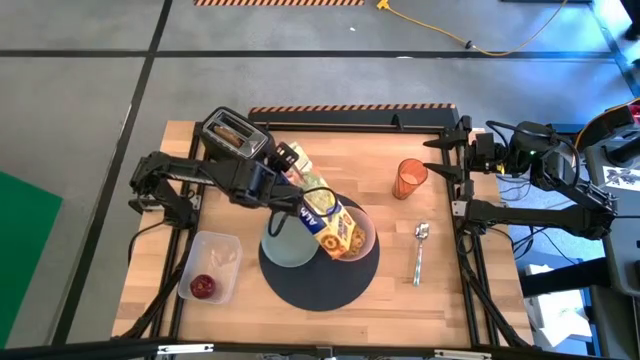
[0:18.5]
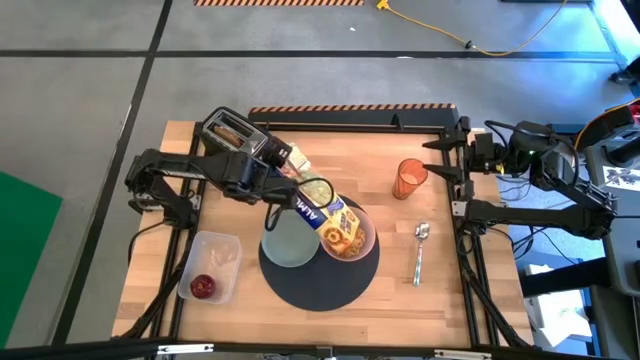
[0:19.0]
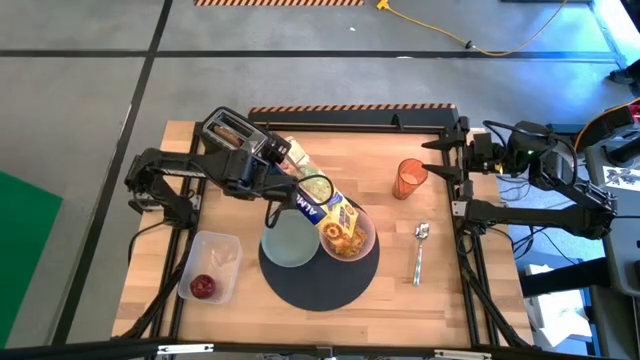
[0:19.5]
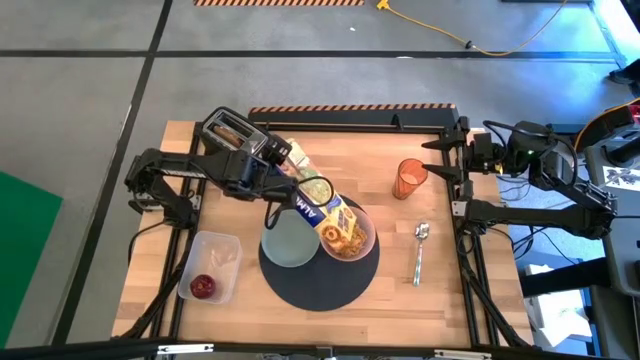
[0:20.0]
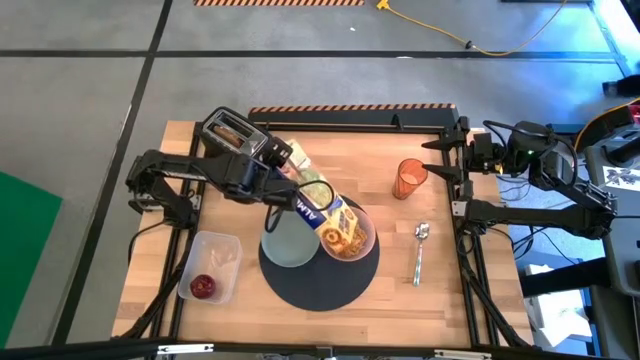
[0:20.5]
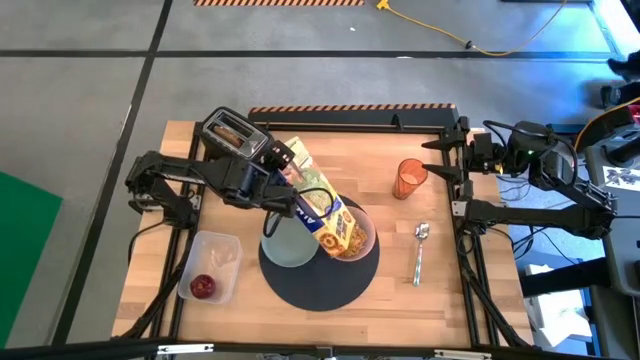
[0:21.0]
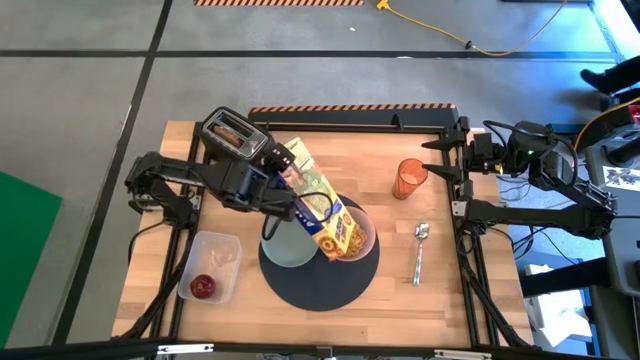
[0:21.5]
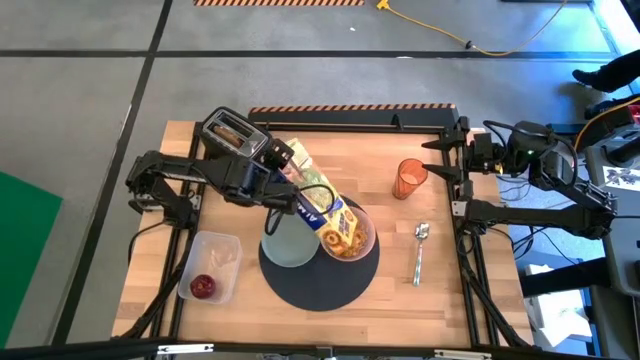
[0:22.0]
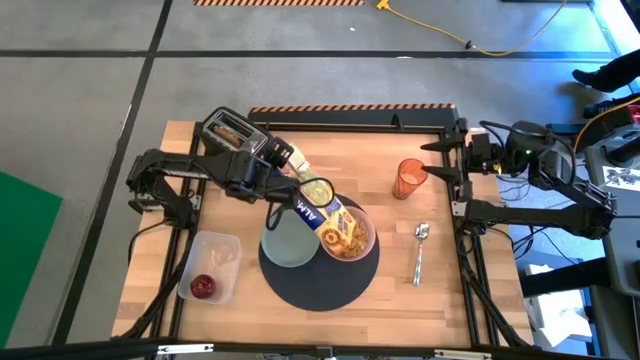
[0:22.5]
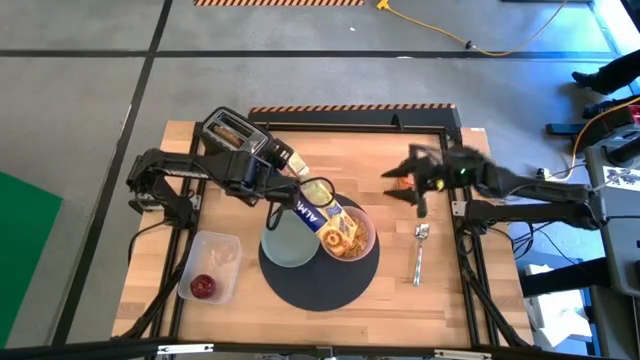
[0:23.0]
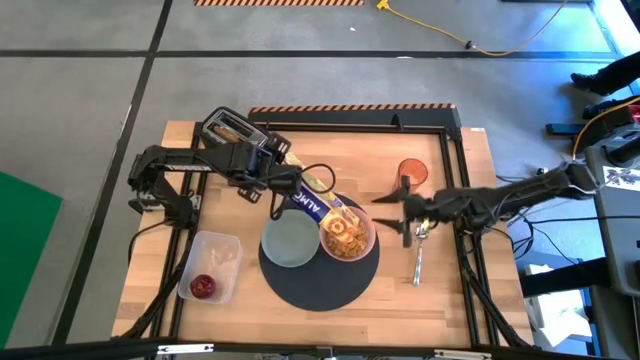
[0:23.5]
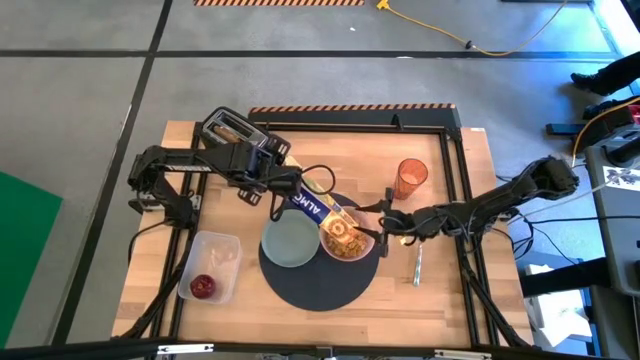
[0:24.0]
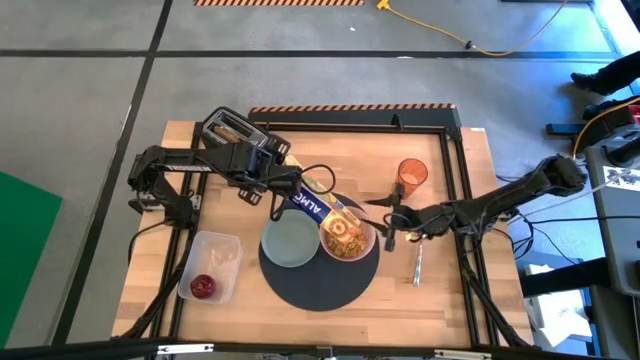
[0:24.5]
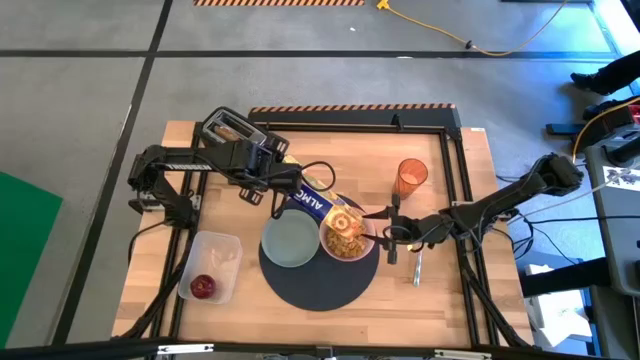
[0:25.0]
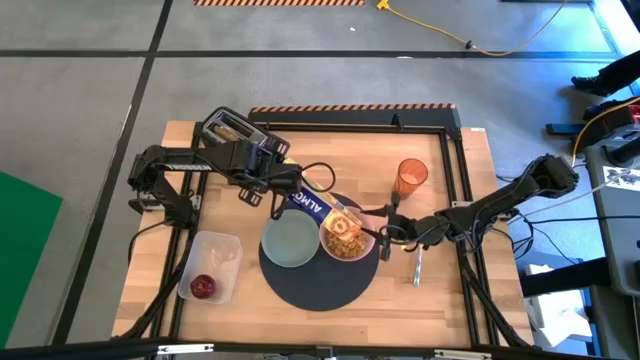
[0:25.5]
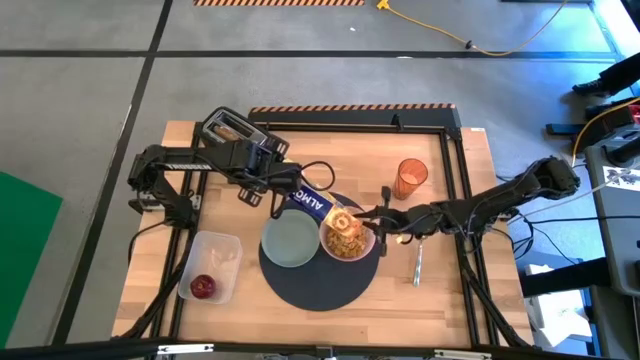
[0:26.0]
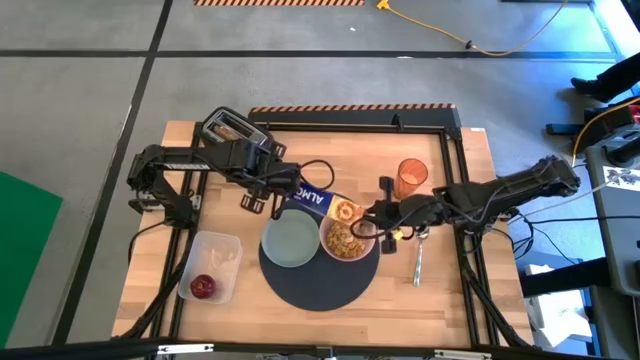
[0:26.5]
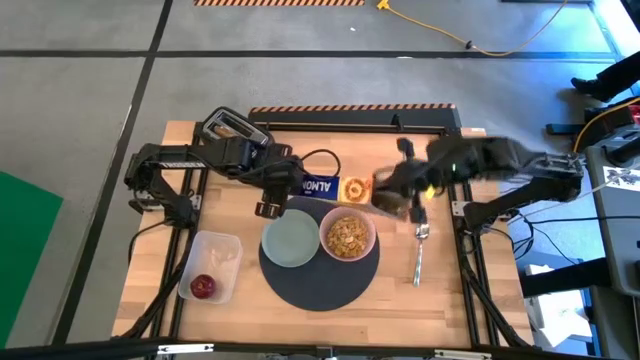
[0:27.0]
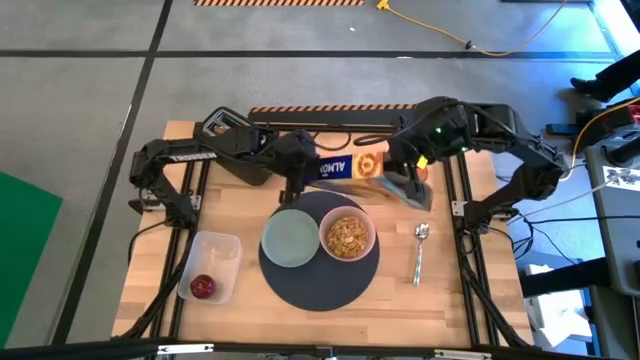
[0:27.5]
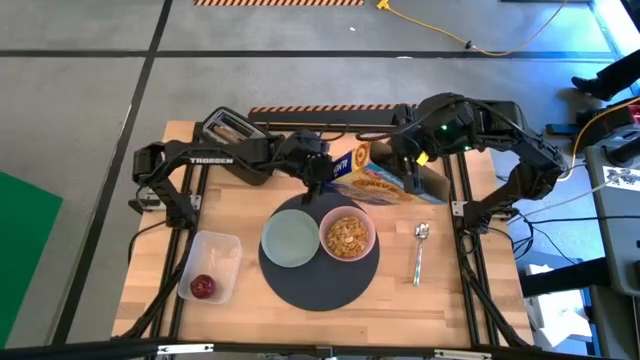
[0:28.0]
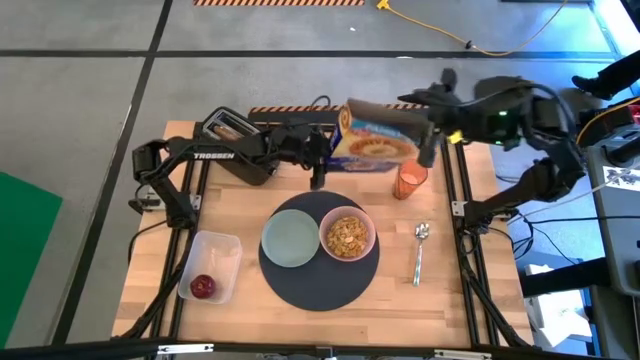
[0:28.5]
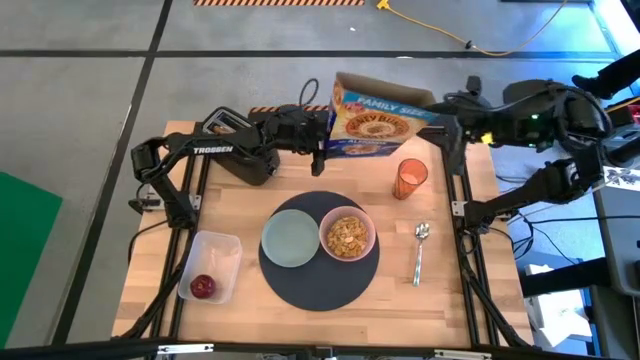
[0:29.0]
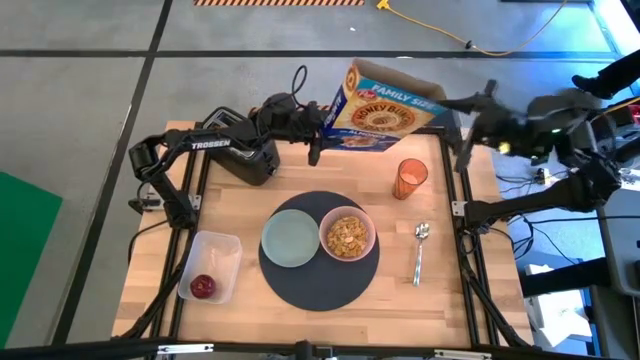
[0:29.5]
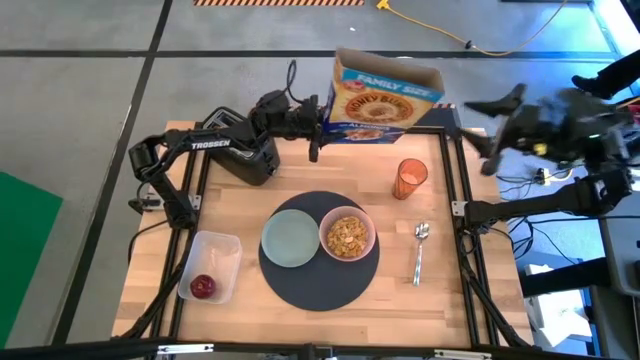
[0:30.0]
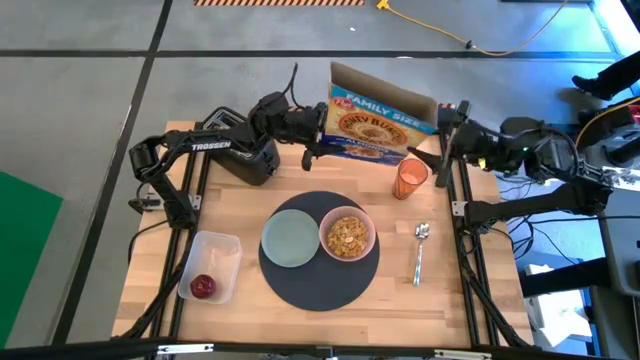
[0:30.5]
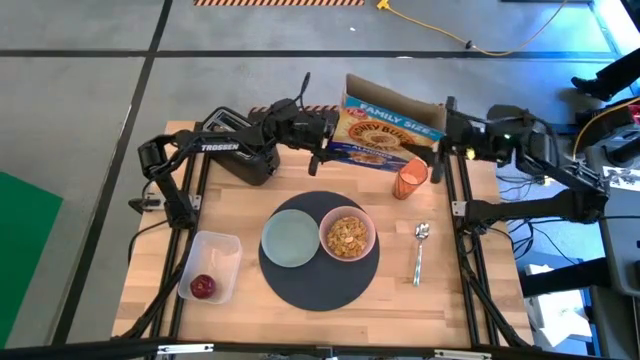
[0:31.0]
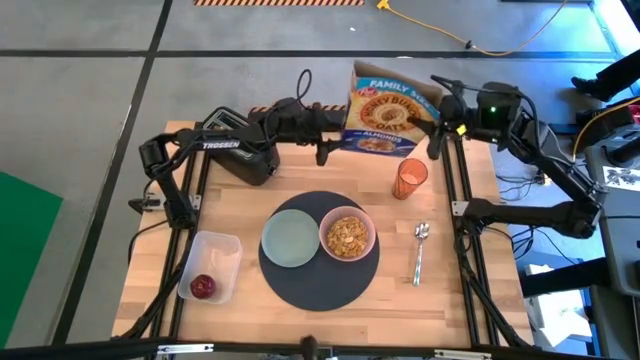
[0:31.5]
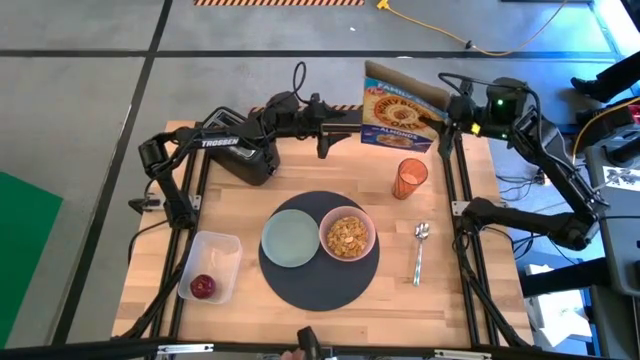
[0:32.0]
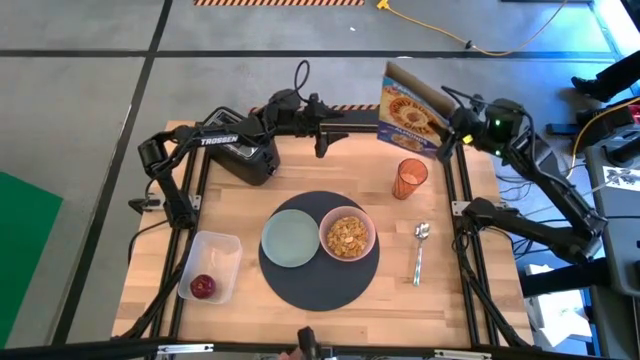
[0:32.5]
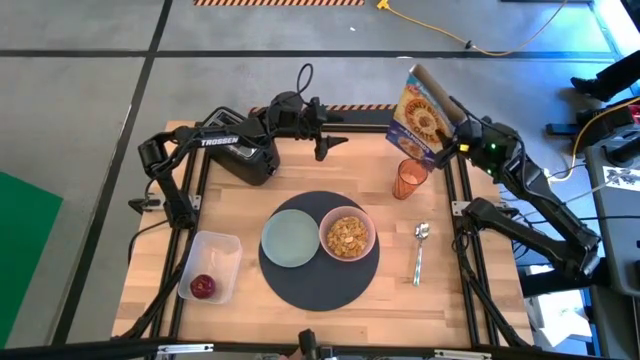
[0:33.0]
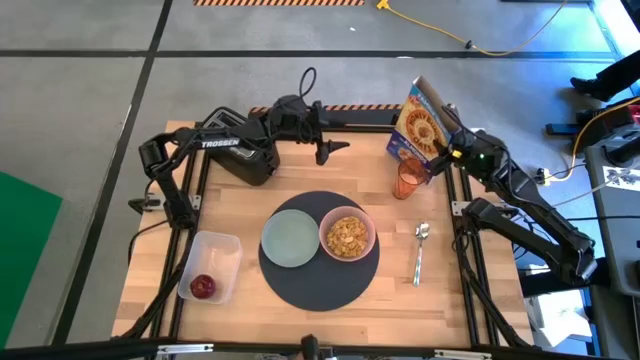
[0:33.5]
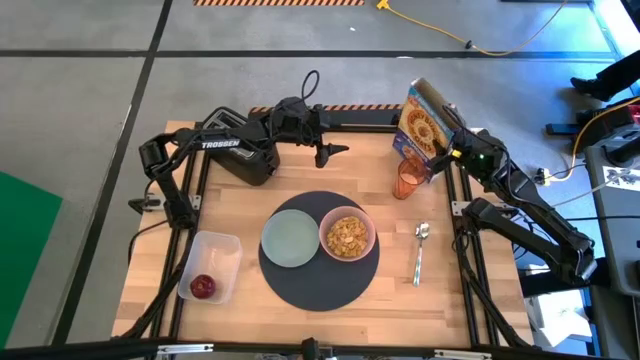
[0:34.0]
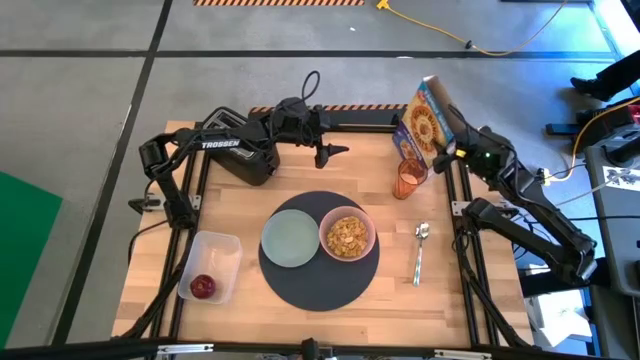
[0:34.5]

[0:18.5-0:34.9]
Task: Arrange a breakfast setting
Pour the cereal into the light pink bowl
